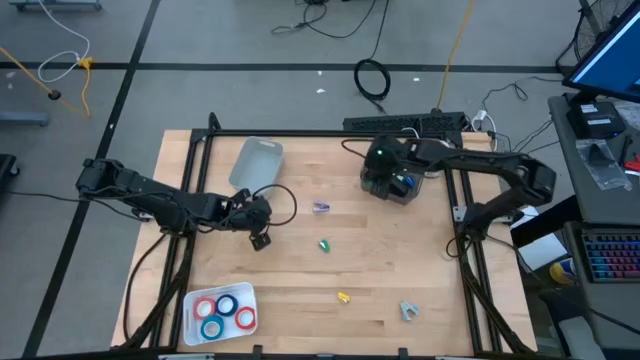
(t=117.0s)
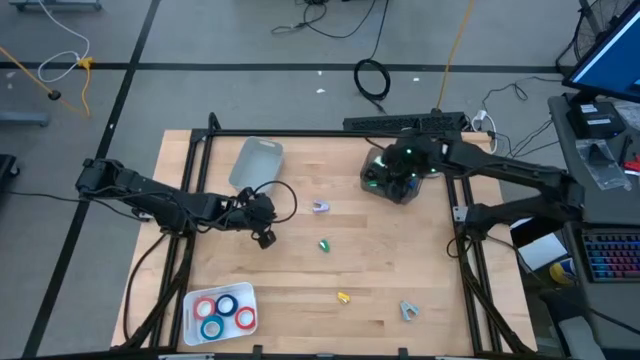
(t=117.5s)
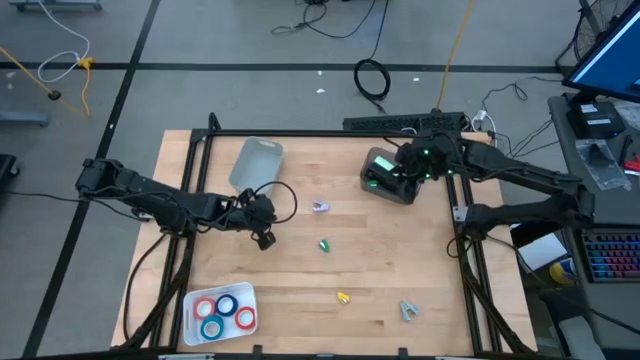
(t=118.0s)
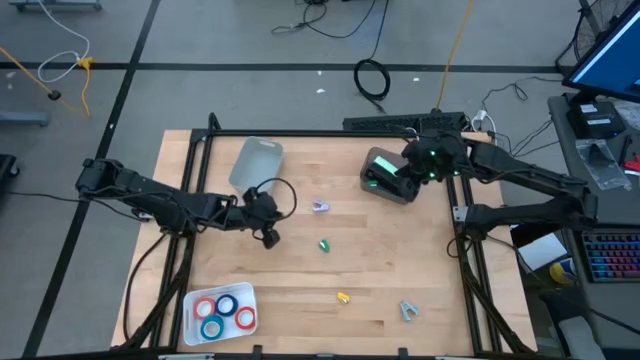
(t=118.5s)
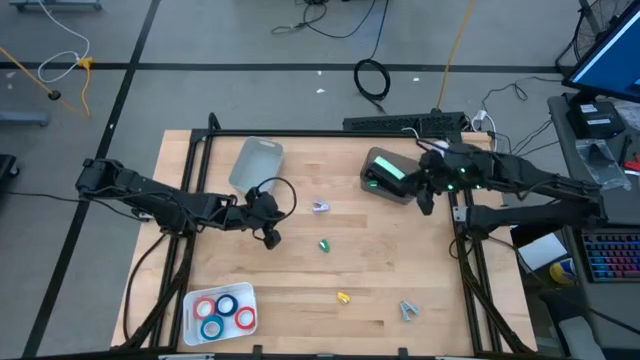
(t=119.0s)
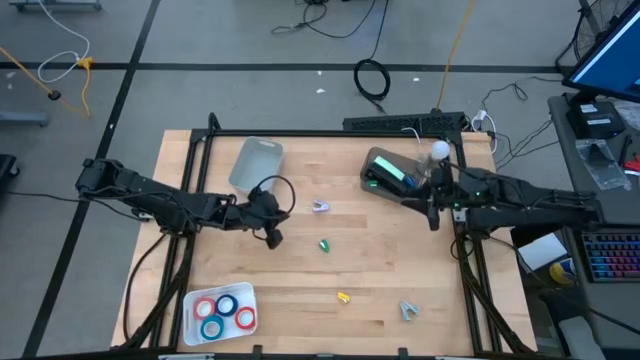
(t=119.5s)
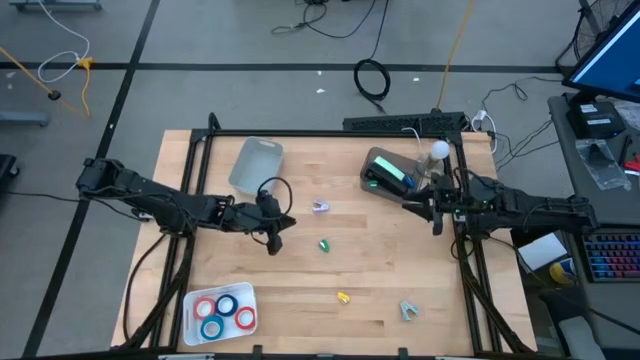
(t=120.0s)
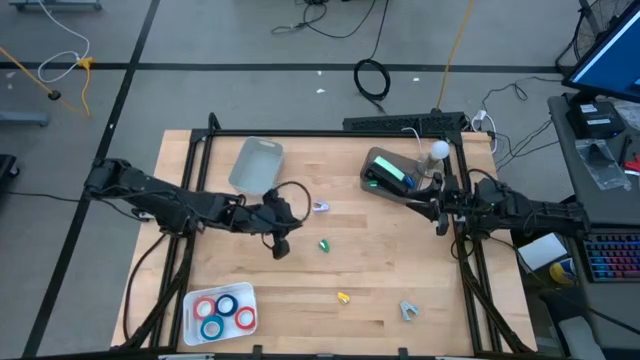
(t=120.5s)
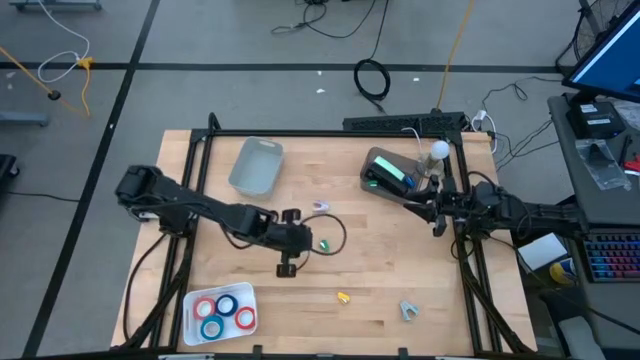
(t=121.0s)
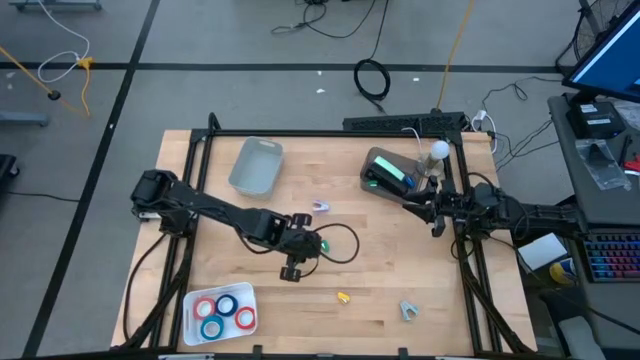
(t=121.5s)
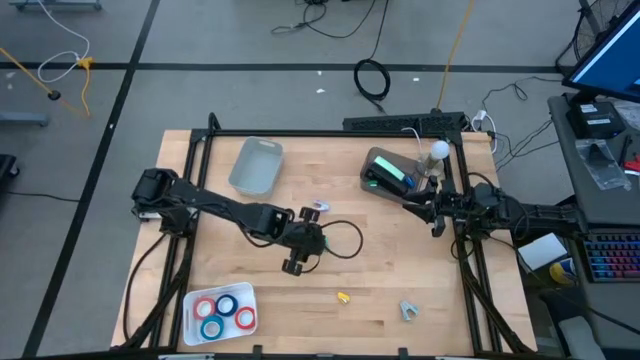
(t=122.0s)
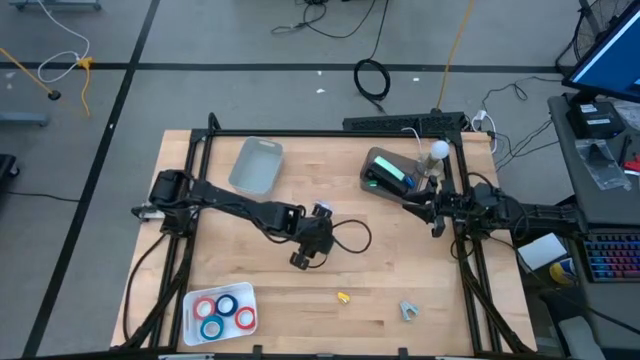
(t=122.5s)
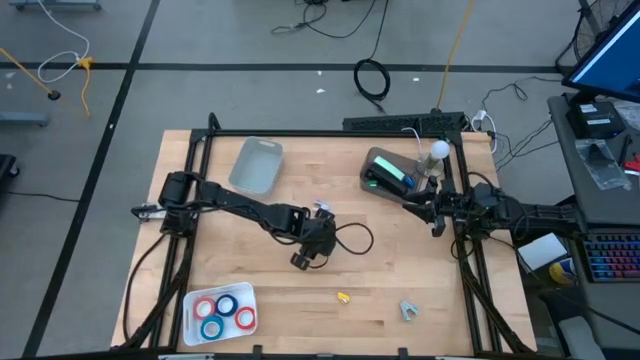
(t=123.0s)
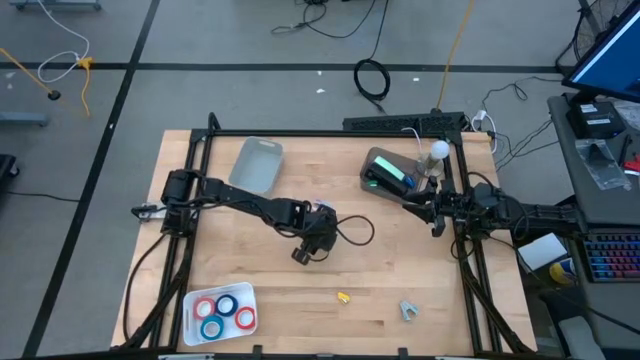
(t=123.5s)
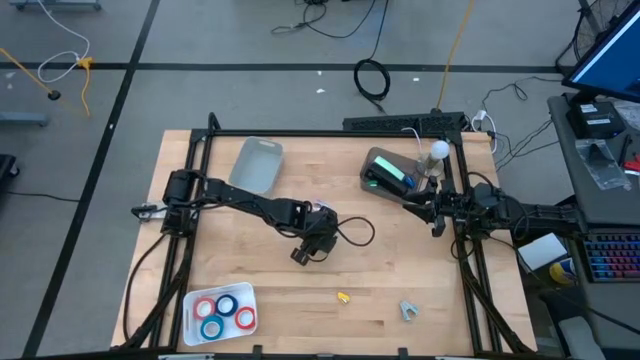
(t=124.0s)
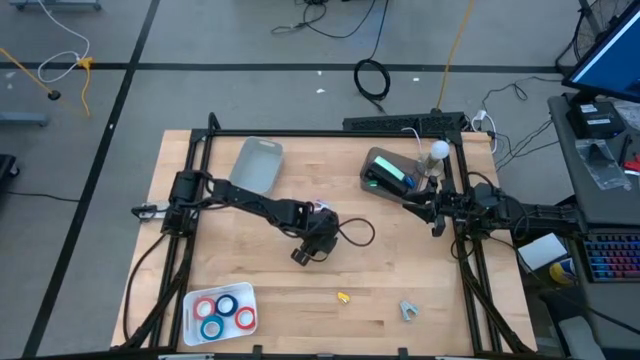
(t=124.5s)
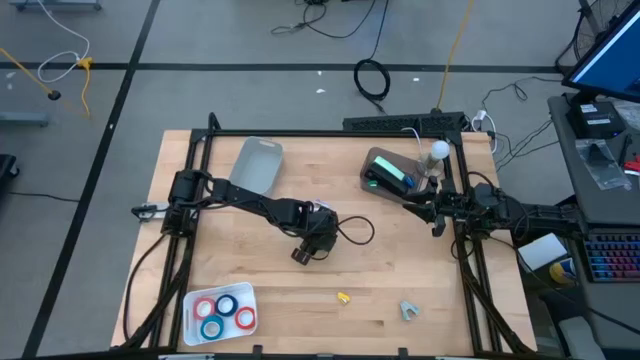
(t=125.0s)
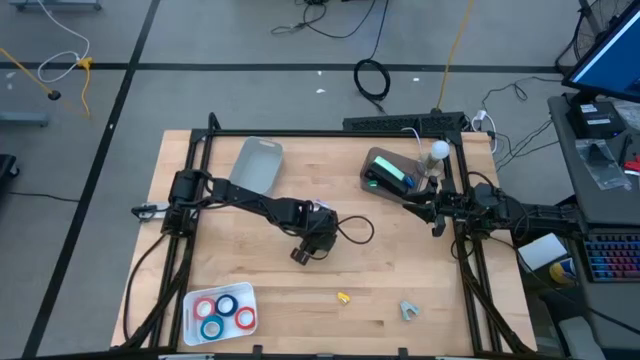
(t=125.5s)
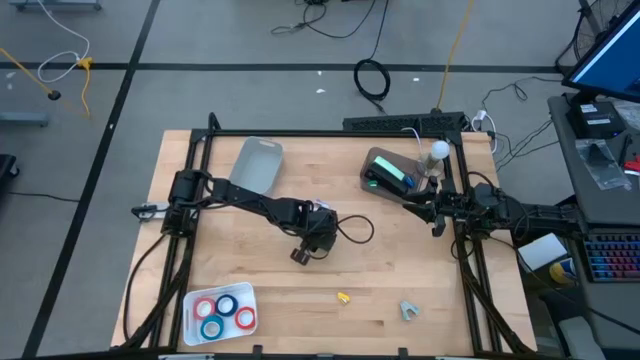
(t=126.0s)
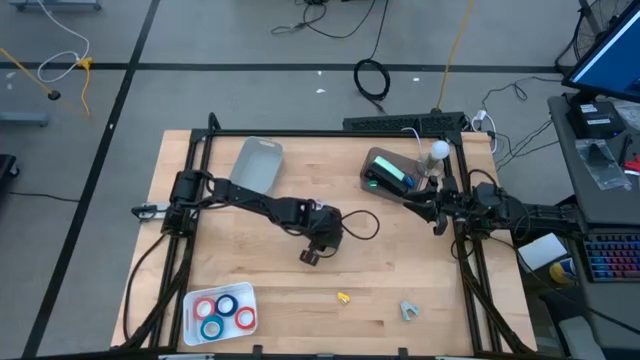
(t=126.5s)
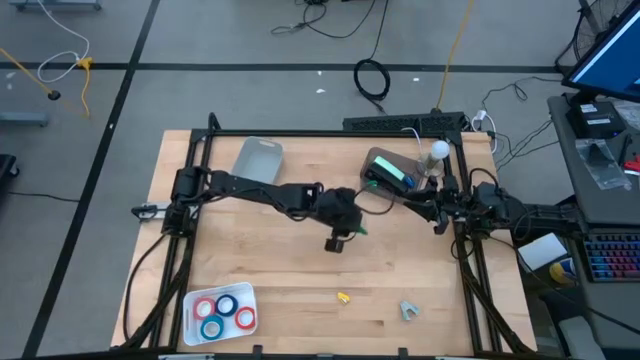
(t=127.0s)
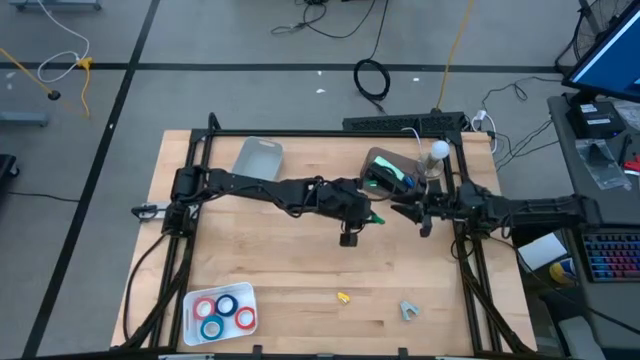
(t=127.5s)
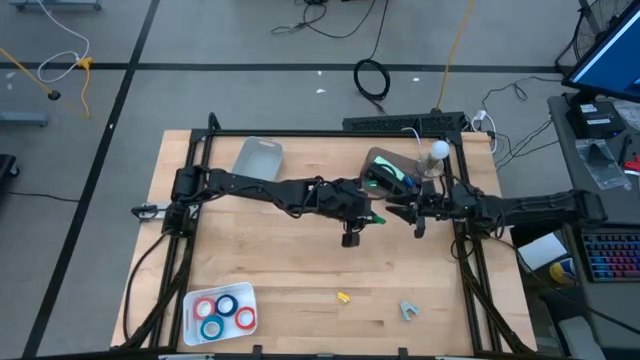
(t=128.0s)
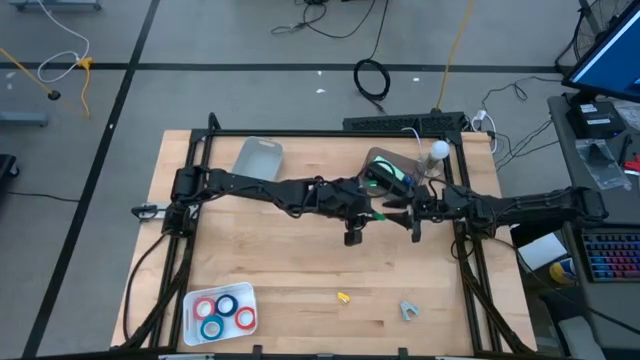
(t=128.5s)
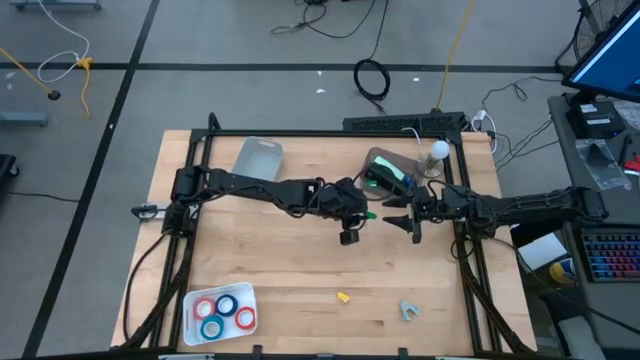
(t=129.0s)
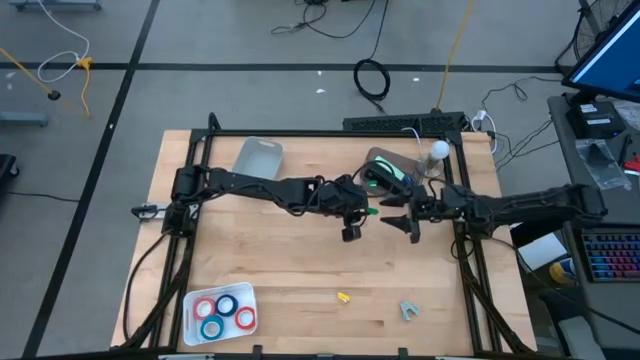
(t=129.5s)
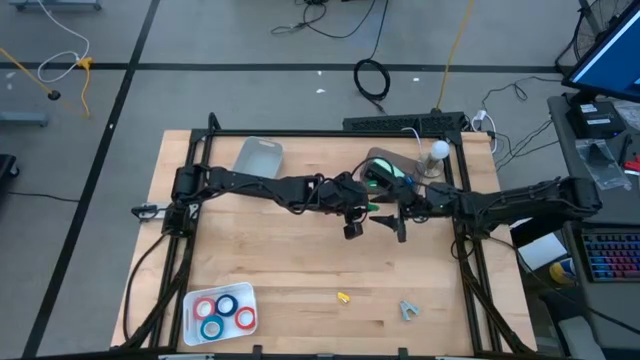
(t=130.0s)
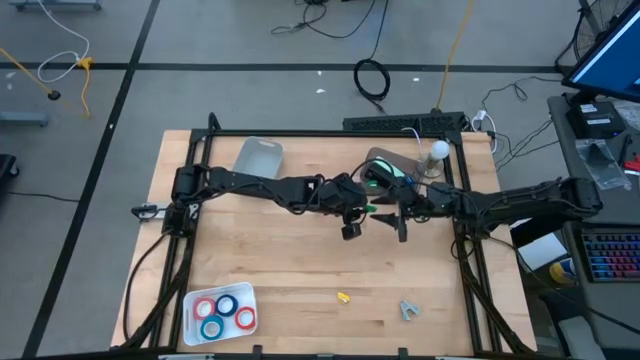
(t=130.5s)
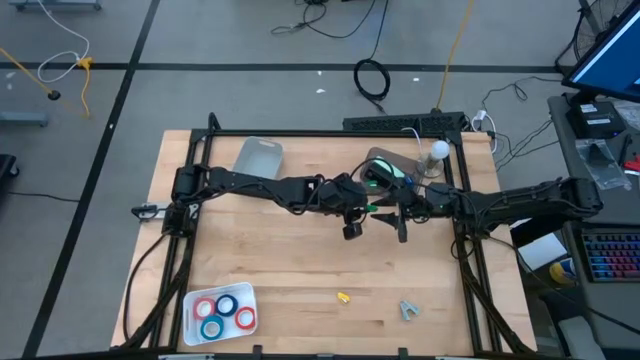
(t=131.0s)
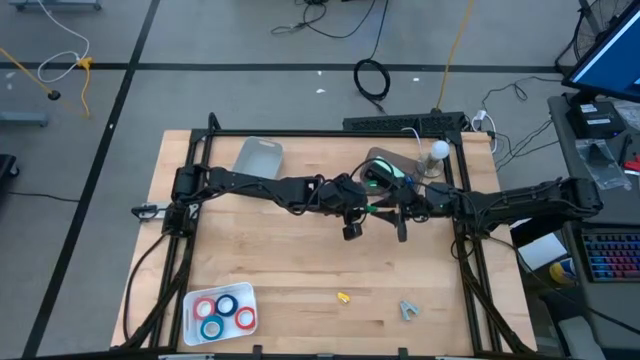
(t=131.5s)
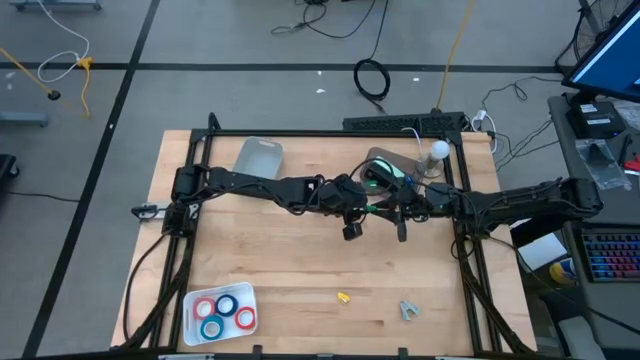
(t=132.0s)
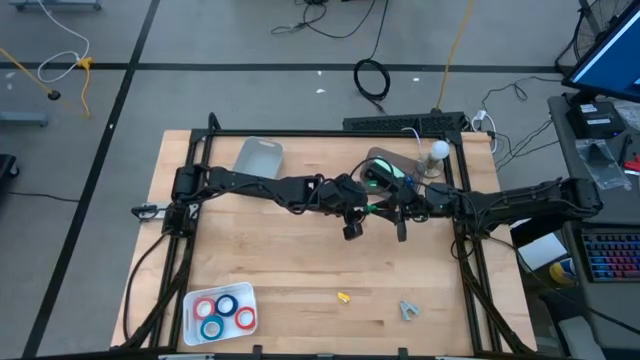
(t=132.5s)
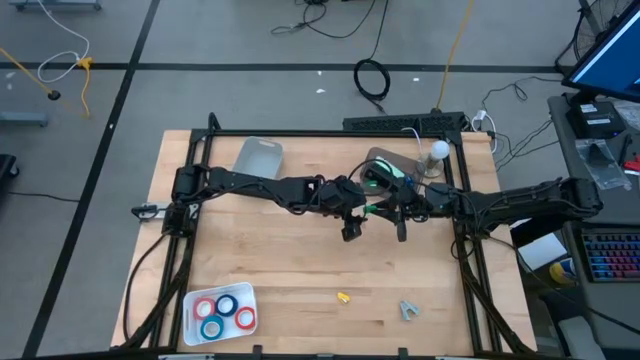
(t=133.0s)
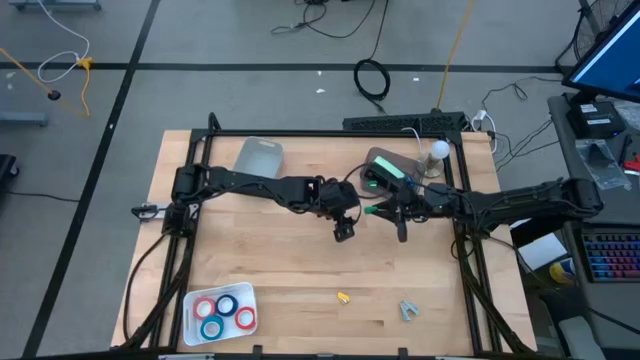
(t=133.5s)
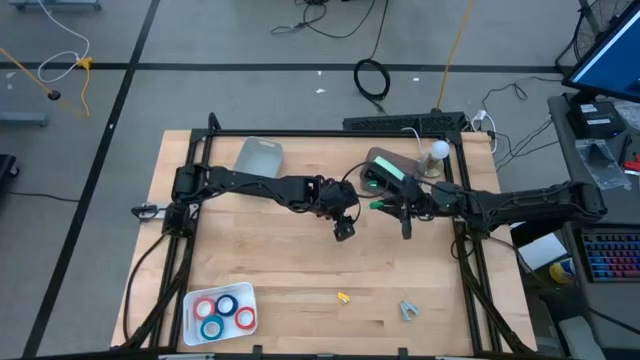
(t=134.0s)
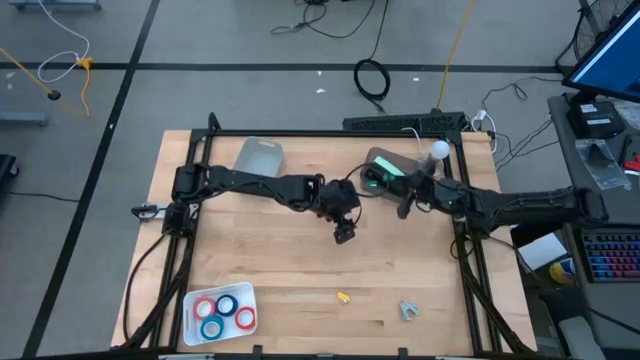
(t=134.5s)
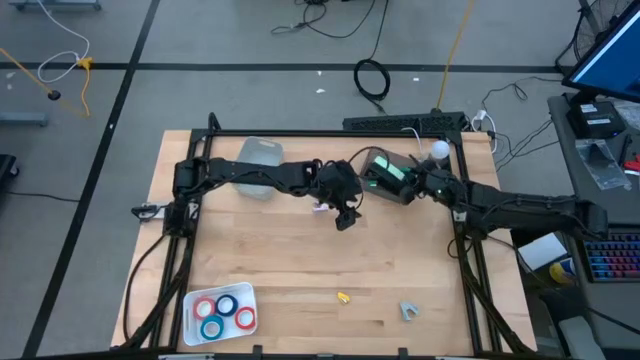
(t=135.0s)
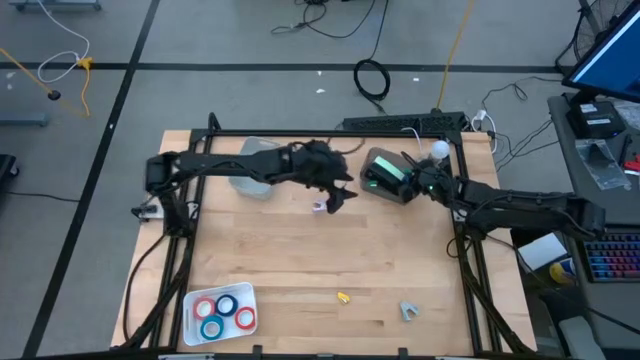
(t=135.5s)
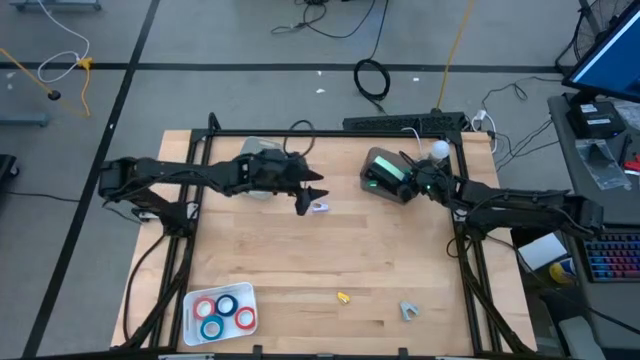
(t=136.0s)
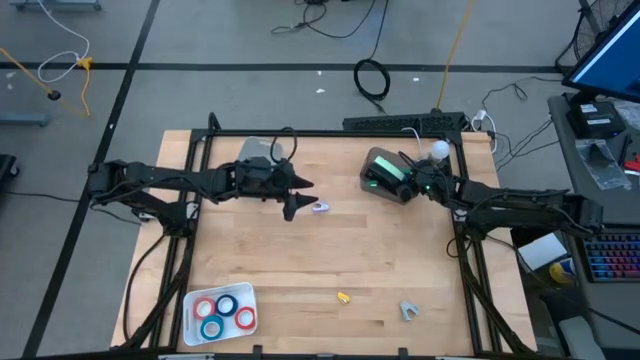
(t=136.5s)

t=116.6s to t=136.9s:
Task: Pick and place Stapler, Stapler remover, tape
Put the green small stapler into the black bin

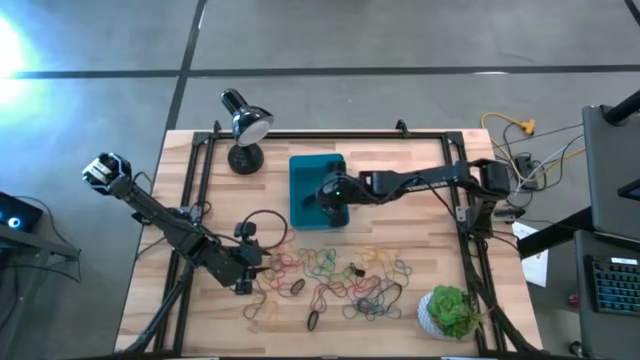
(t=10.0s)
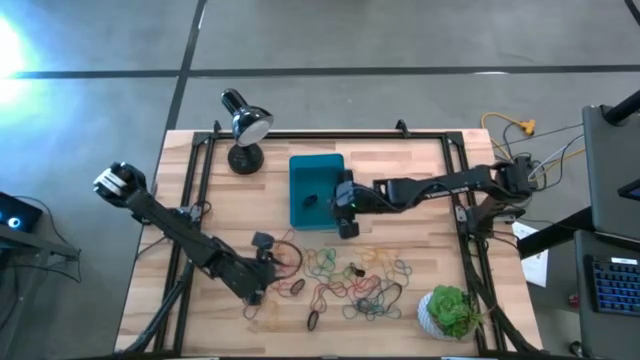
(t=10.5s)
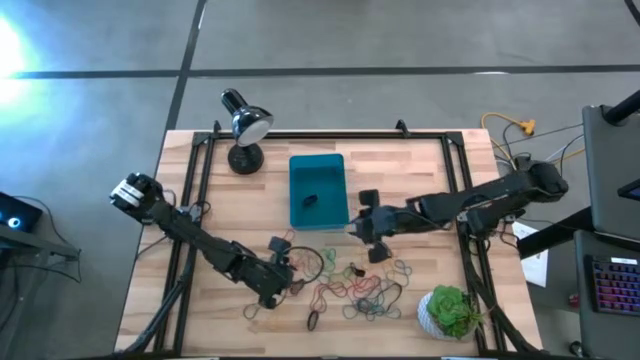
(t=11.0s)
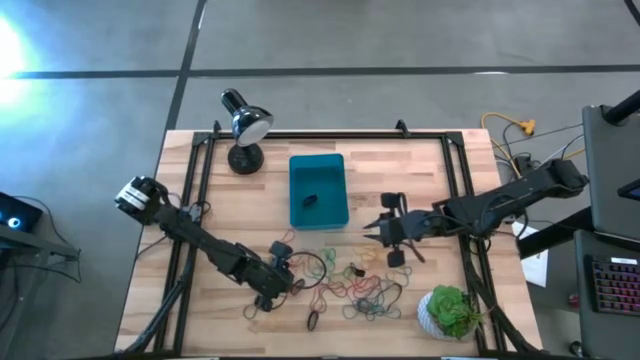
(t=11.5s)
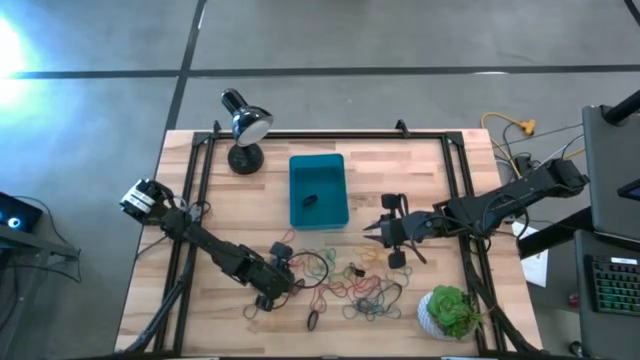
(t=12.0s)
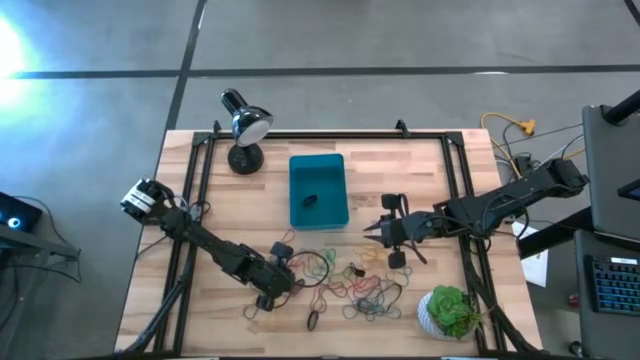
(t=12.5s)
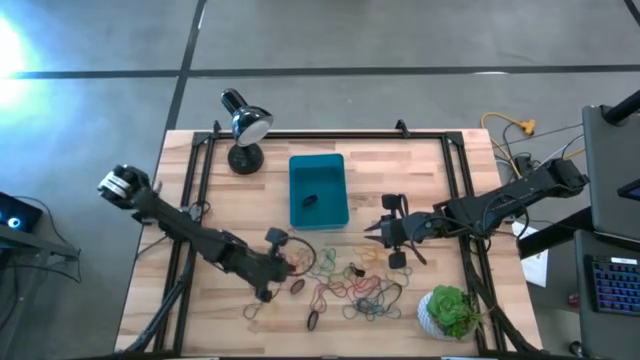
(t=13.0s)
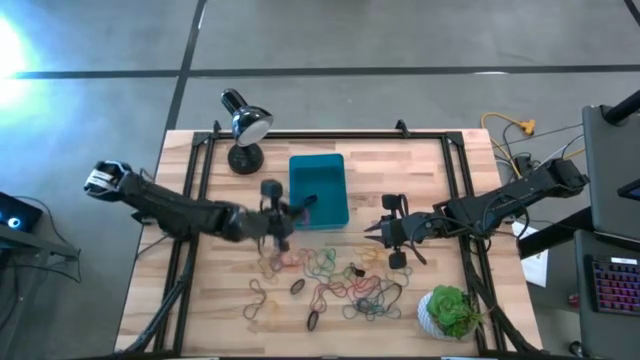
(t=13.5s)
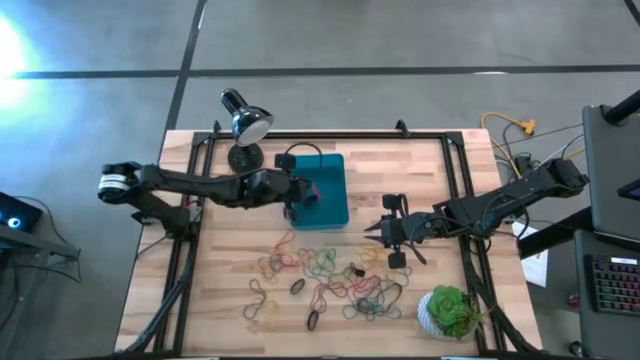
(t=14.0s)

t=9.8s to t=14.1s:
Task: Pick and place rubber bands into bin
Put the red rubber band into the blue bin
